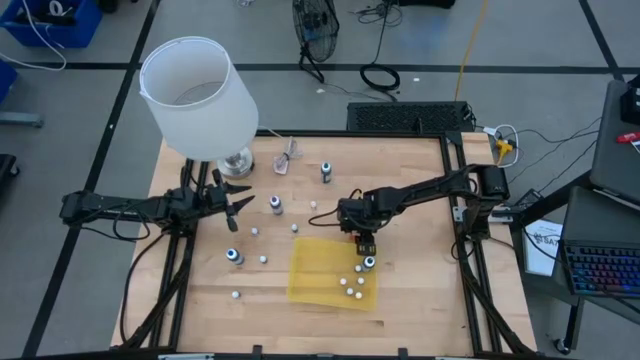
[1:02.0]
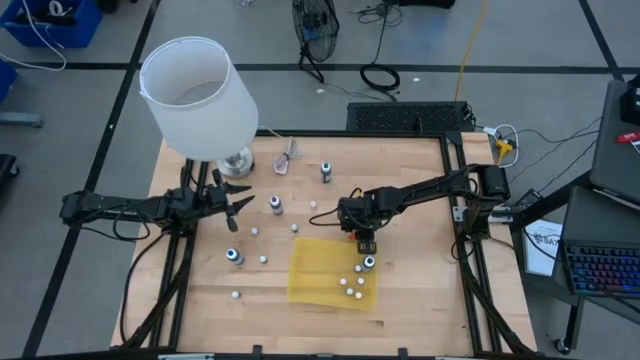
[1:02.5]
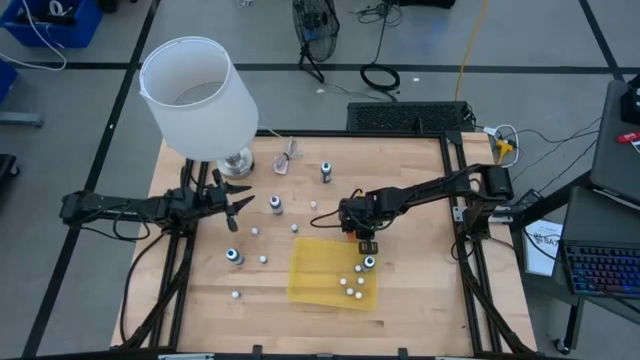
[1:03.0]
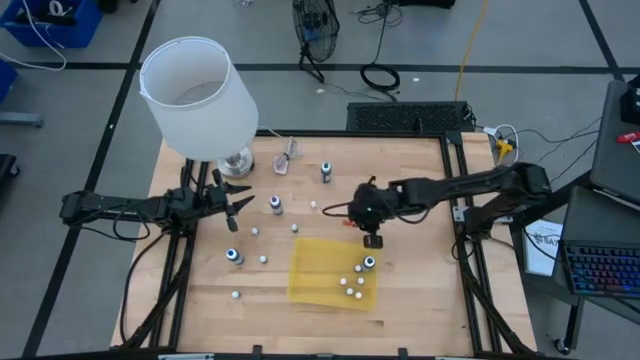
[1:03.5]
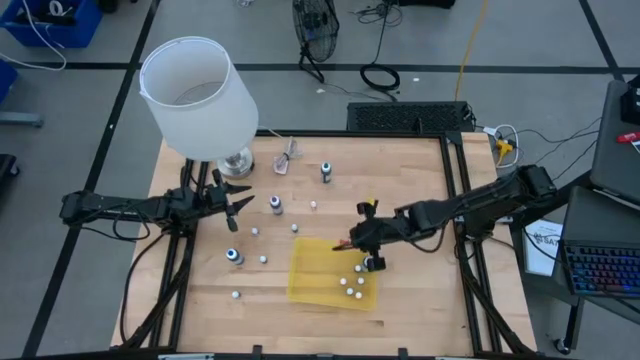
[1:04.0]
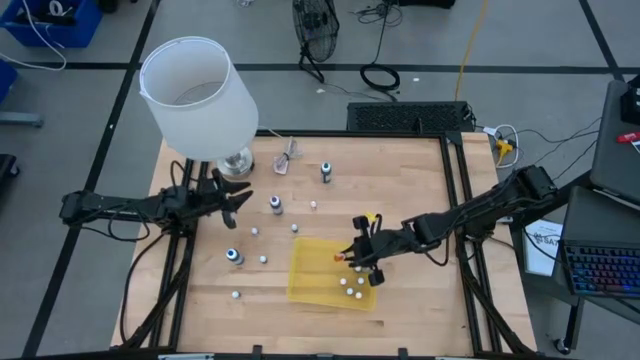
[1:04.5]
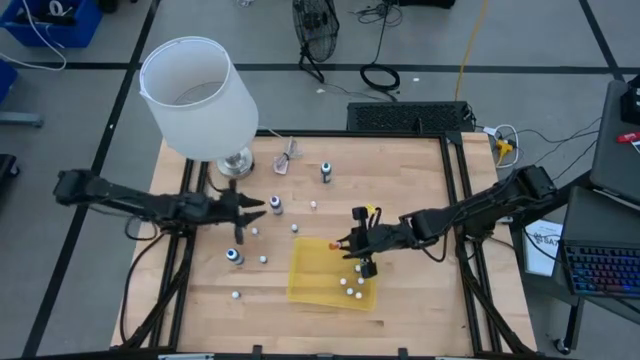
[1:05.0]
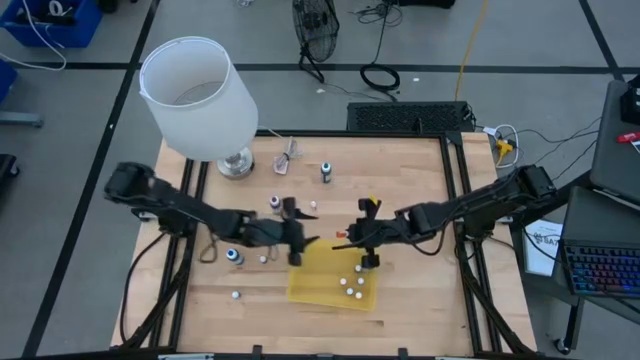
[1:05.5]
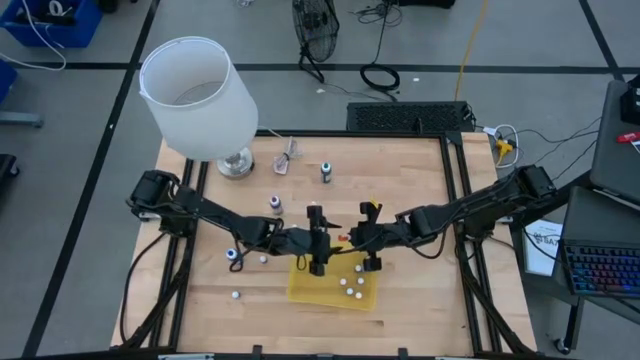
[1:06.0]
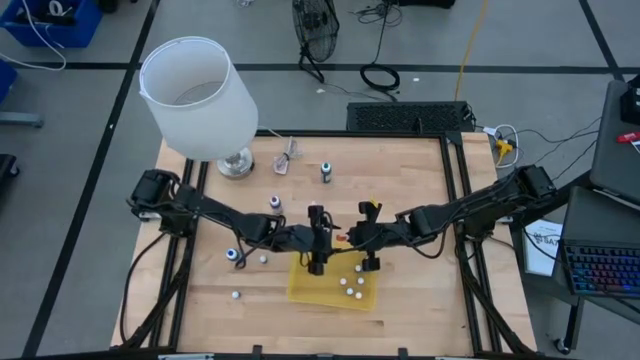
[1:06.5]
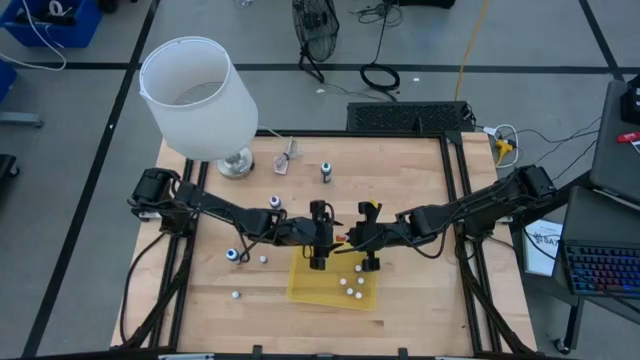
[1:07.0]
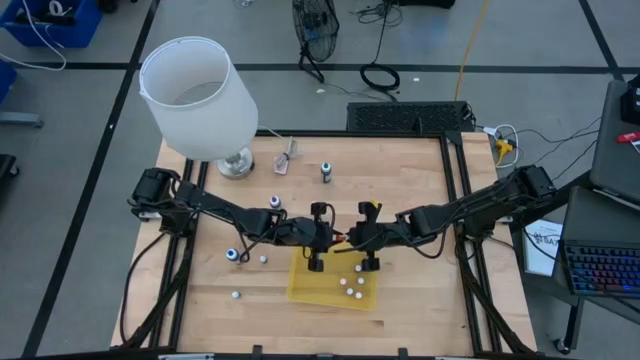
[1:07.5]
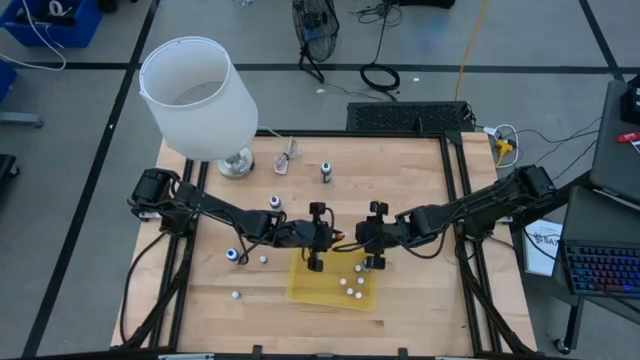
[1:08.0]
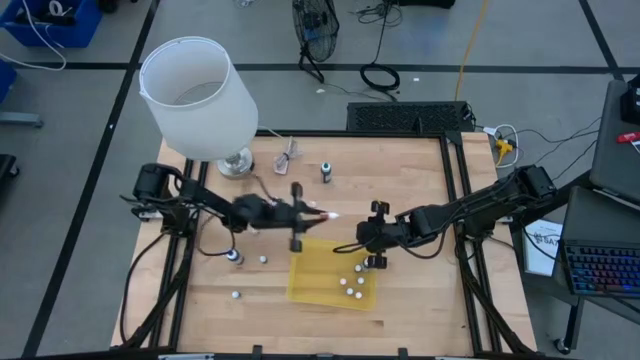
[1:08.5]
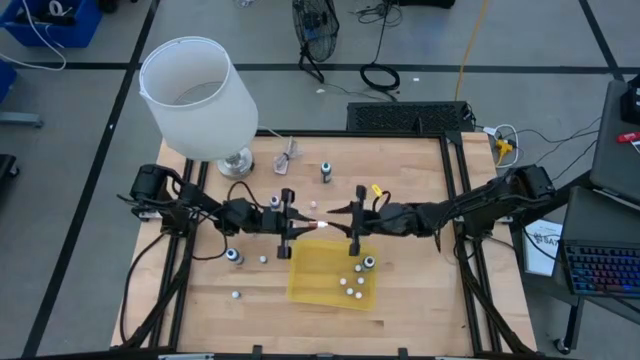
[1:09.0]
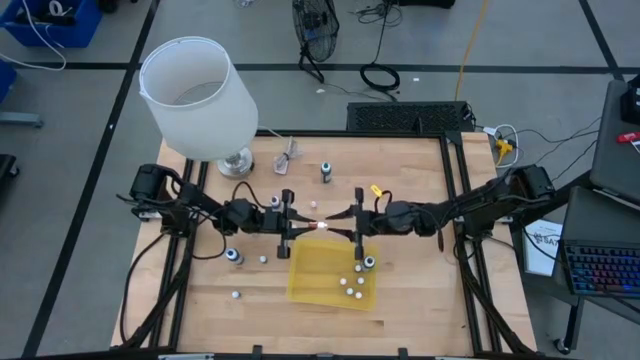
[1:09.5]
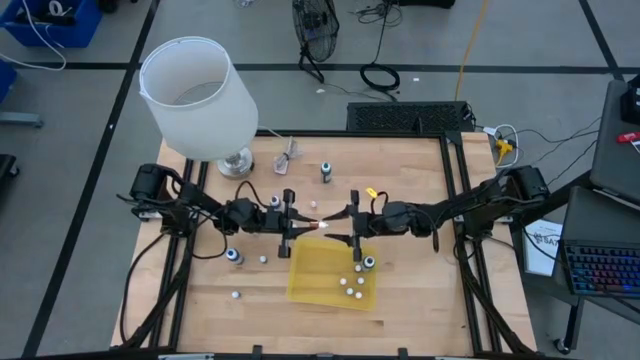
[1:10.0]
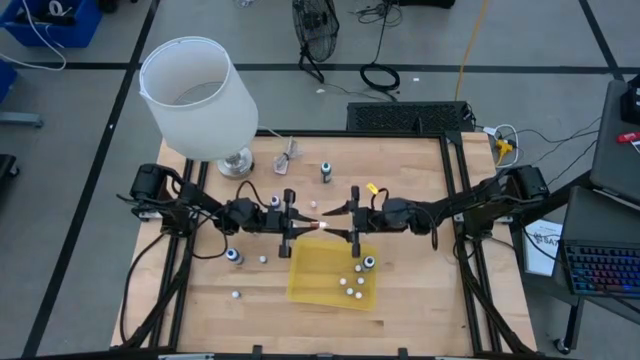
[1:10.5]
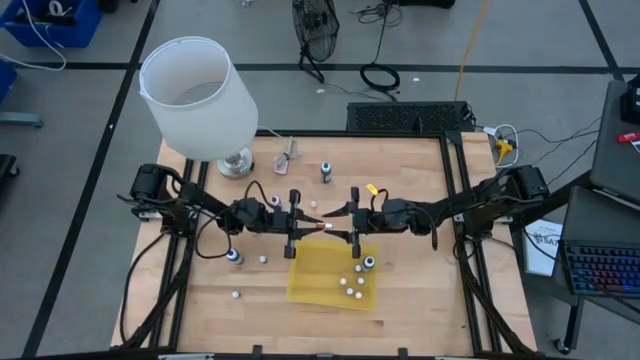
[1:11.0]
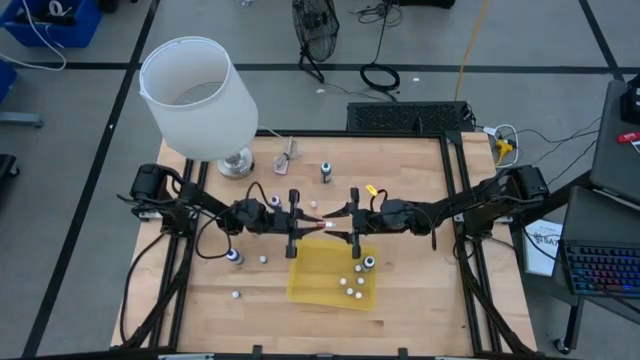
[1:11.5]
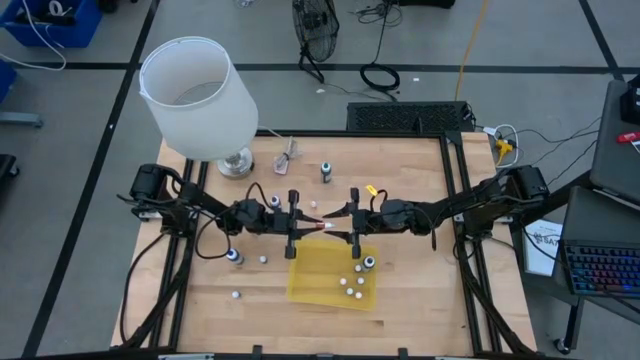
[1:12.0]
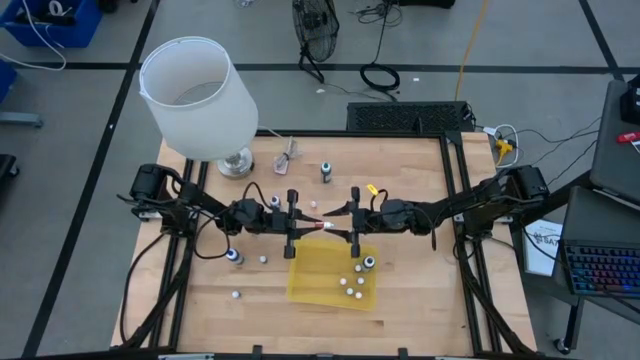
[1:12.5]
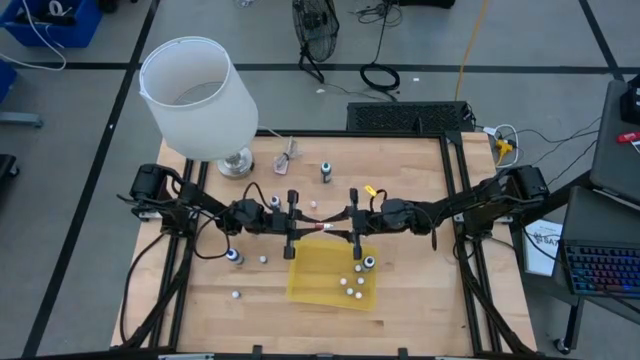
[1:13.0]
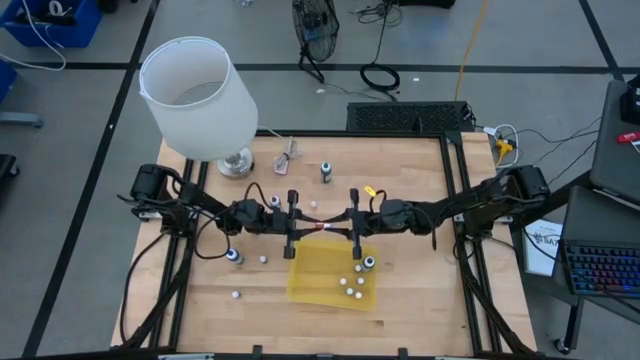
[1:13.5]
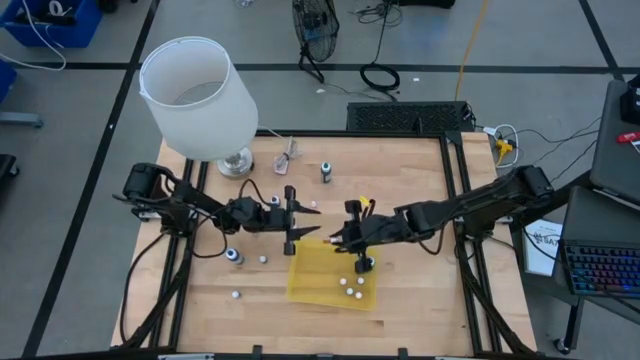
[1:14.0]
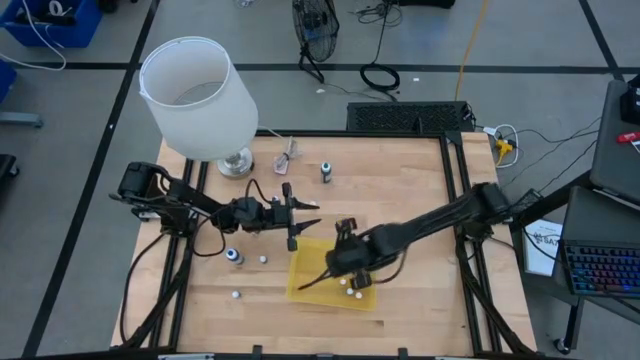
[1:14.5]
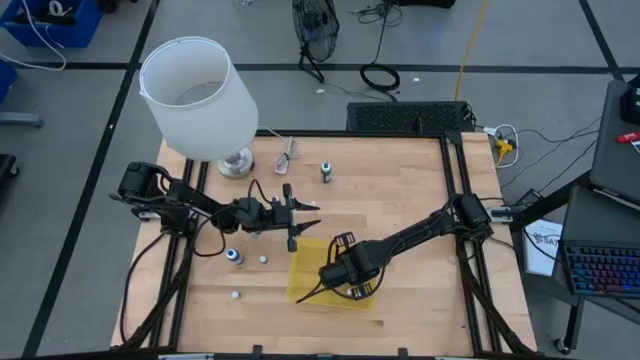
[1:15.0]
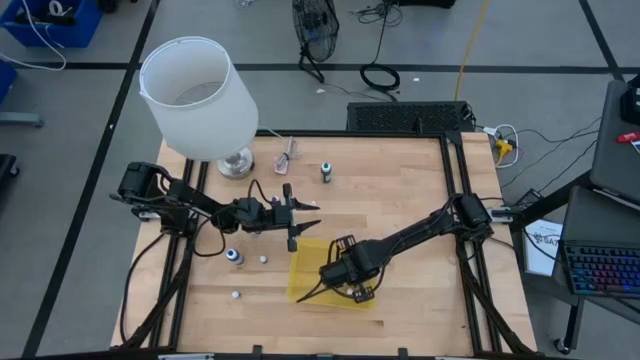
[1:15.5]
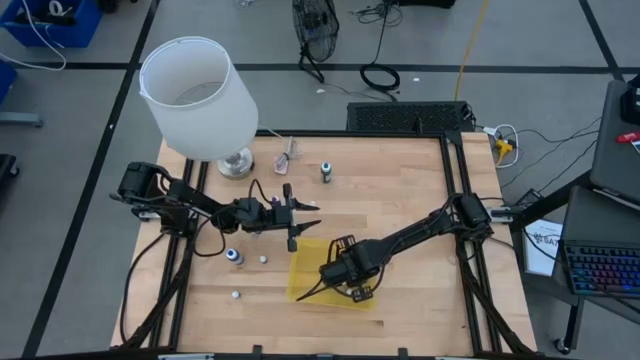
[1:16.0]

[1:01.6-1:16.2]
Task: Pick & Place food coloring
Put the small orange food coloring bottle into the yellow container

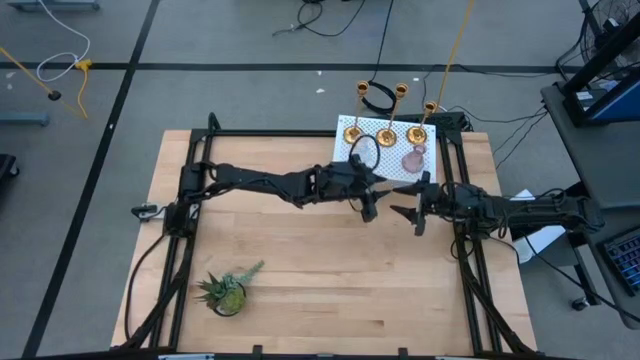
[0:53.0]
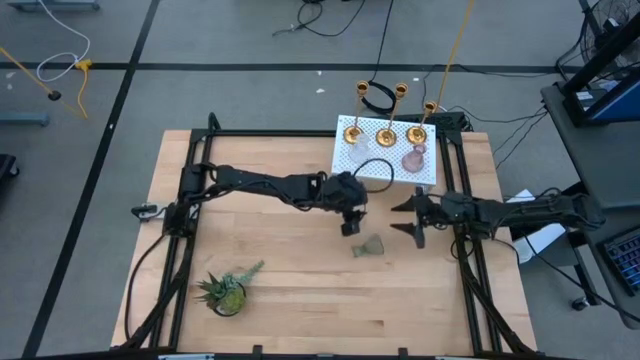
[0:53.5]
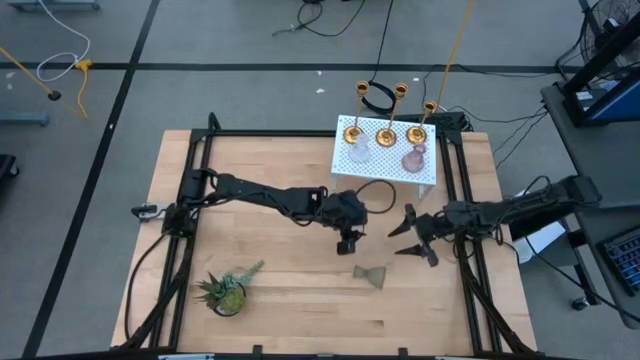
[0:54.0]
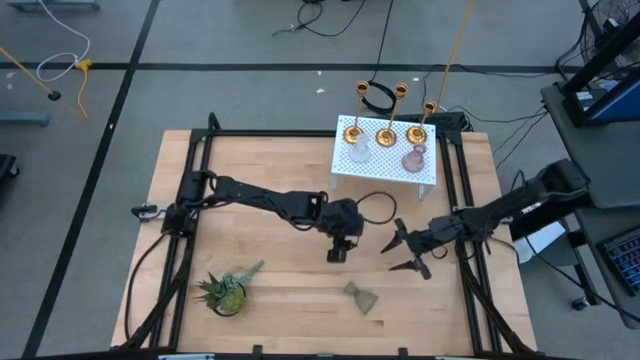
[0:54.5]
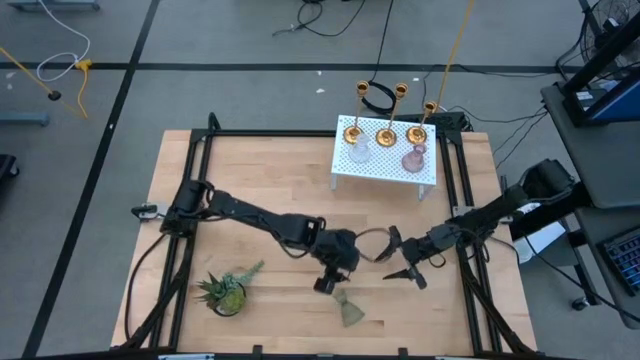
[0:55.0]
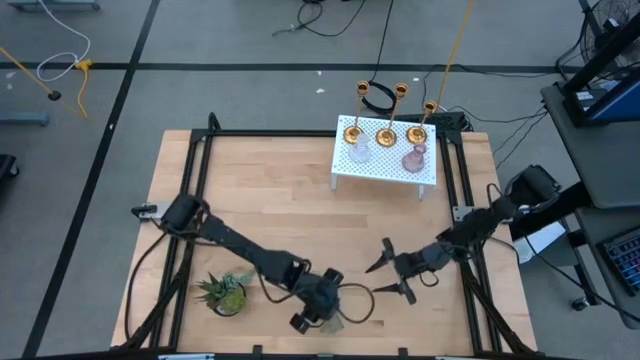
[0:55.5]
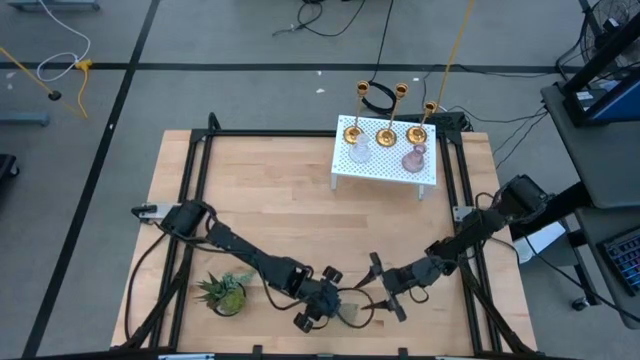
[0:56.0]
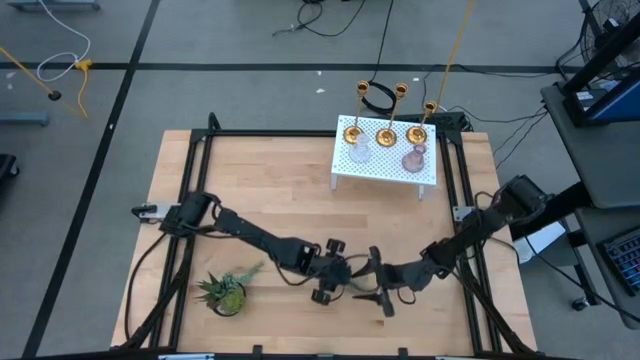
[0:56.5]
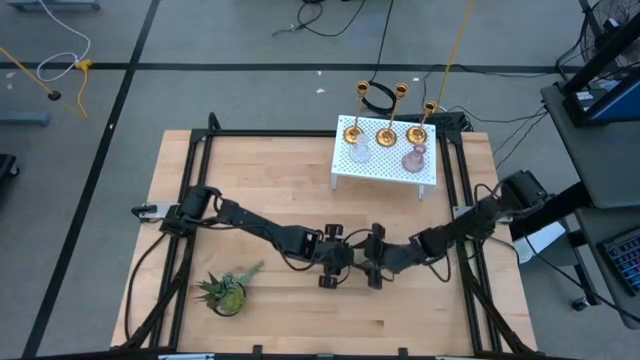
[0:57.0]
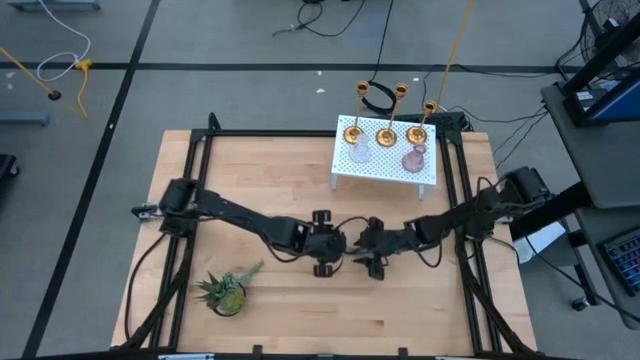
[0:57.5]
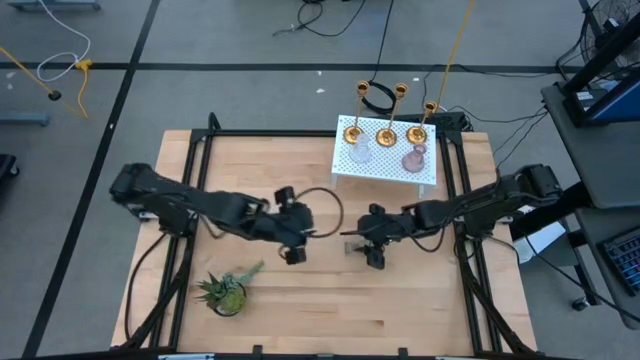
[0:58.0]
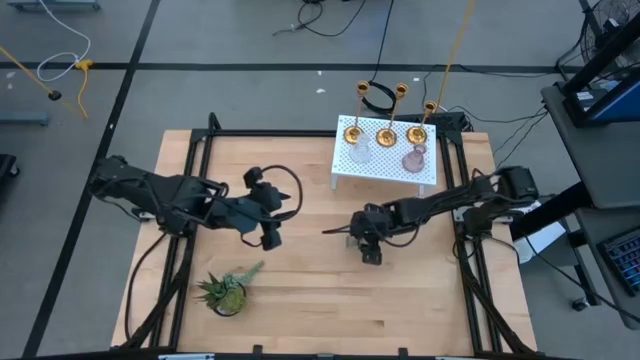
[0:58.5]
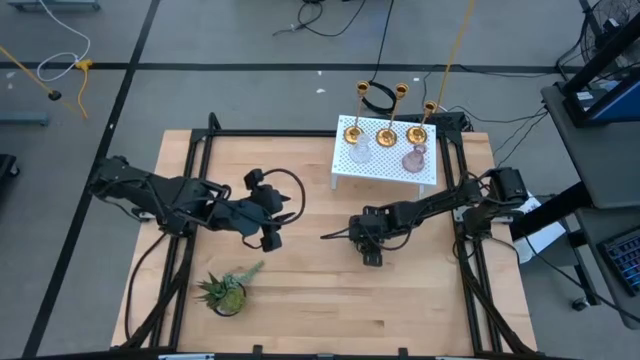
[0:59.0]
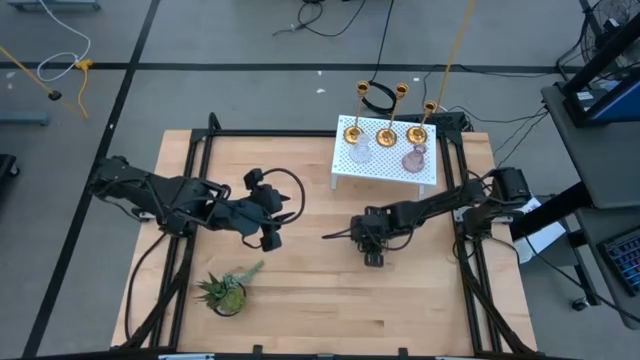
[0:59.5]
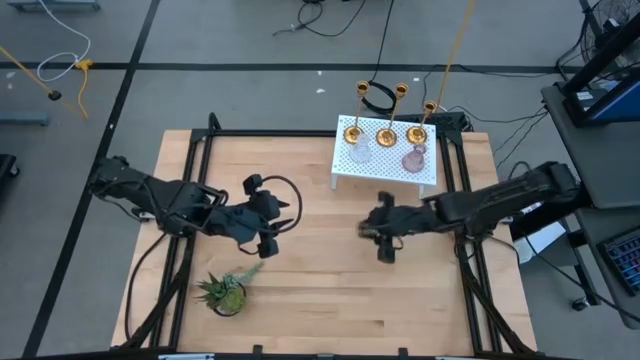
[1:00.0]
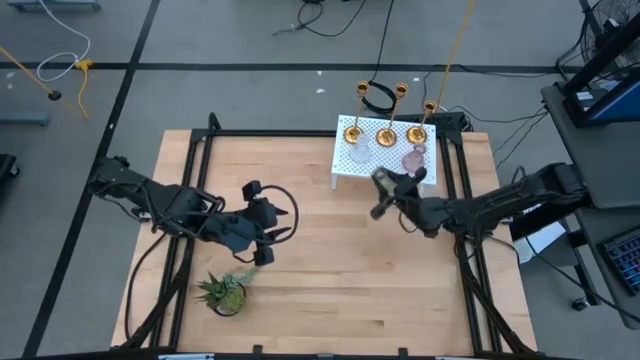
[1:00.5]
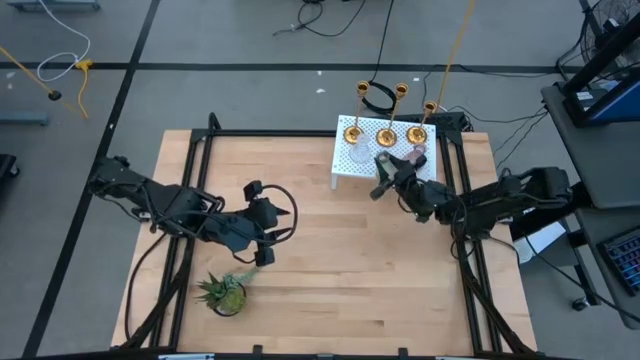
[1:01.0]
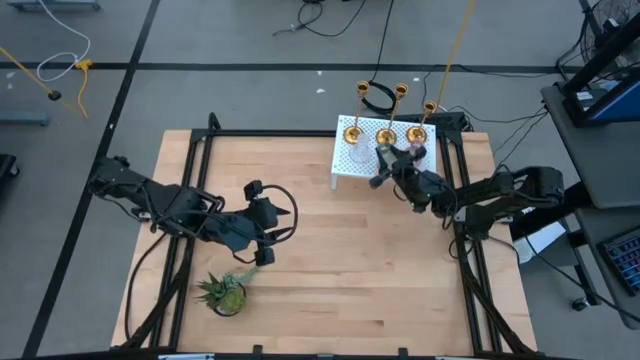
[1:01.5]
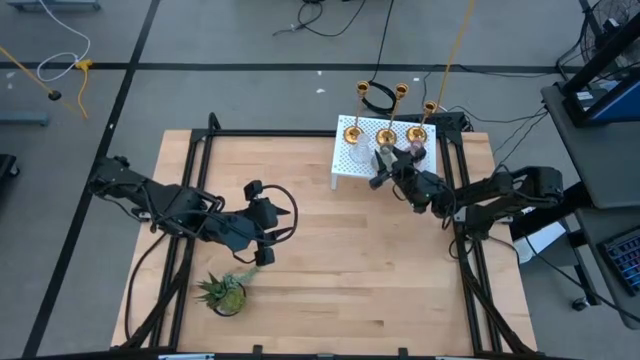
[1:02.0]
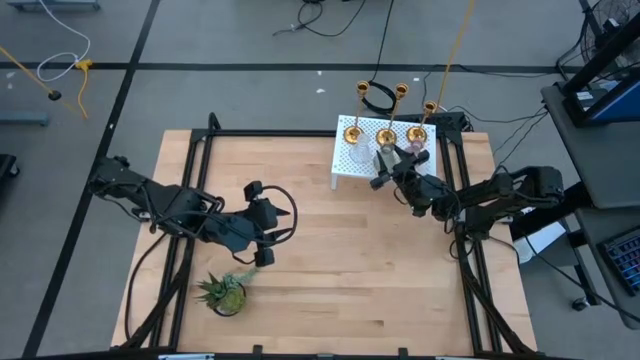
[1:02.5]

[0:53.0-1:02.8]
Task: Pick & Place candle stick holders
Put the green glass candle holder on the shelf
